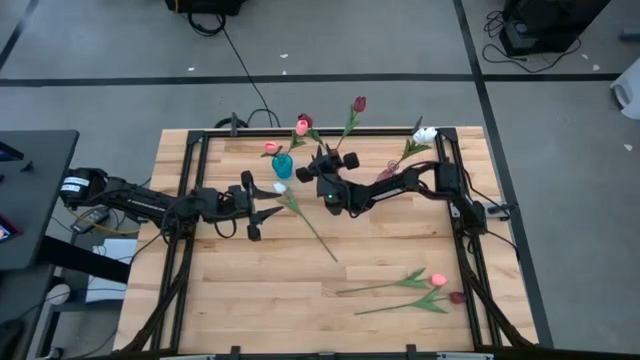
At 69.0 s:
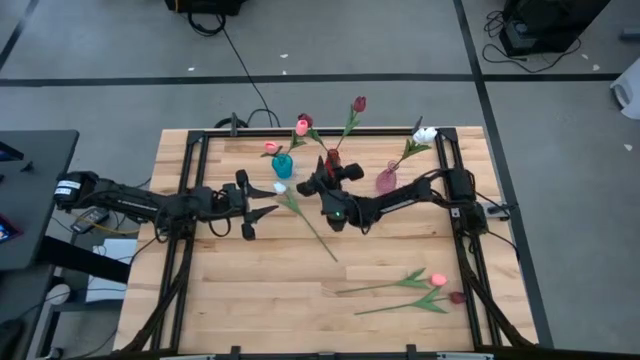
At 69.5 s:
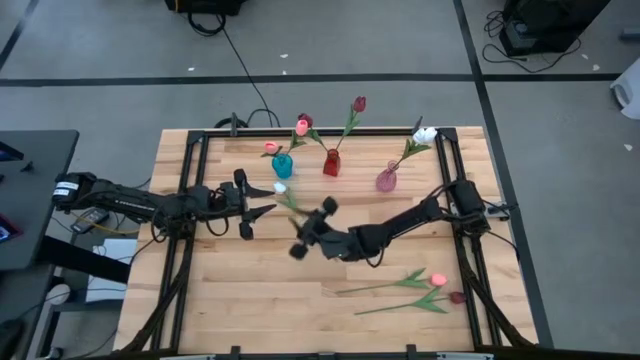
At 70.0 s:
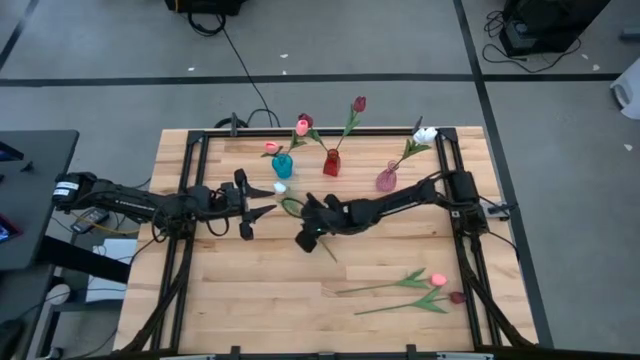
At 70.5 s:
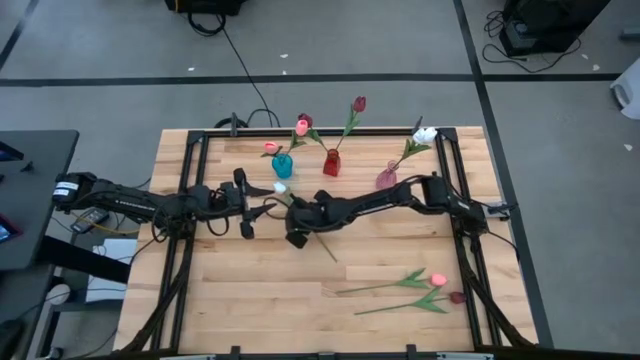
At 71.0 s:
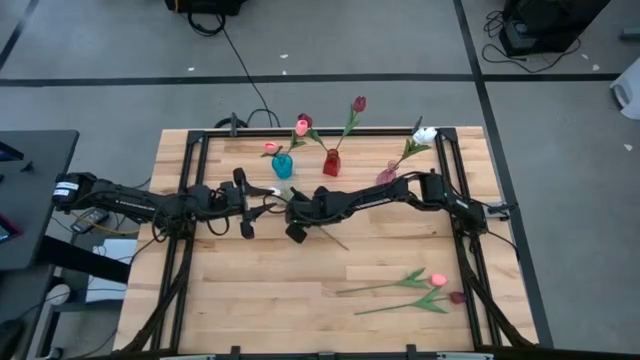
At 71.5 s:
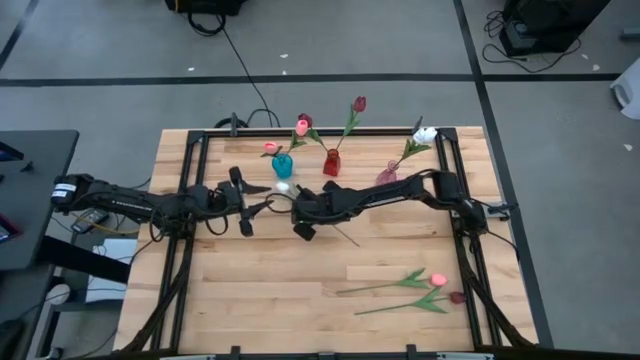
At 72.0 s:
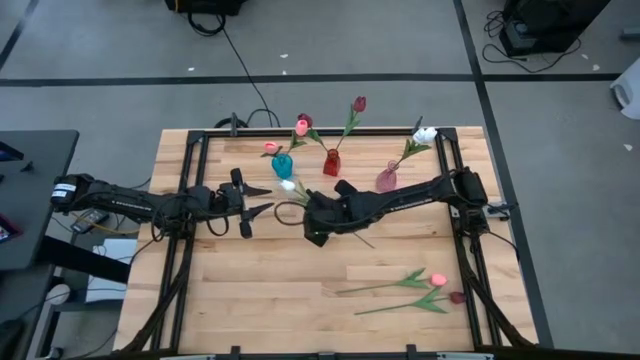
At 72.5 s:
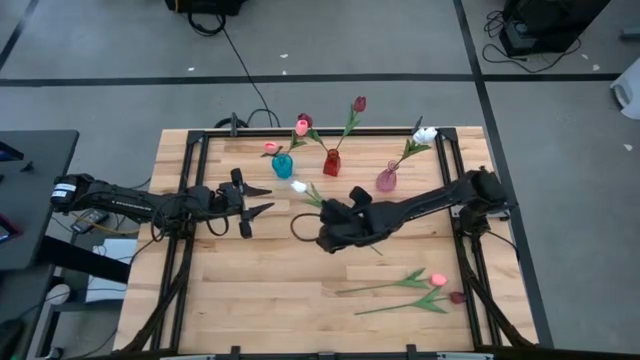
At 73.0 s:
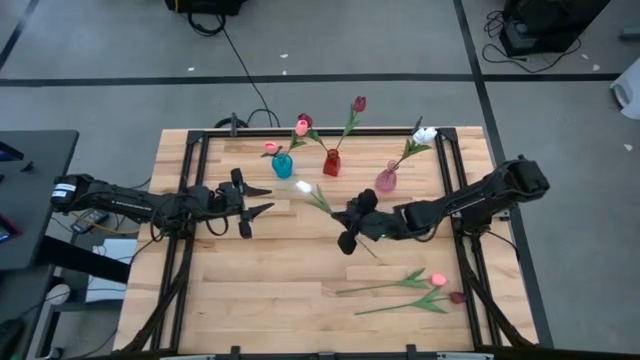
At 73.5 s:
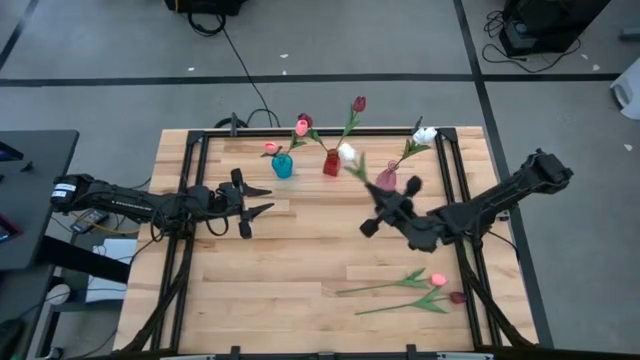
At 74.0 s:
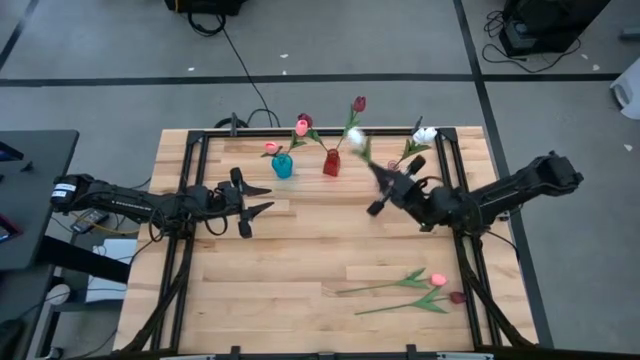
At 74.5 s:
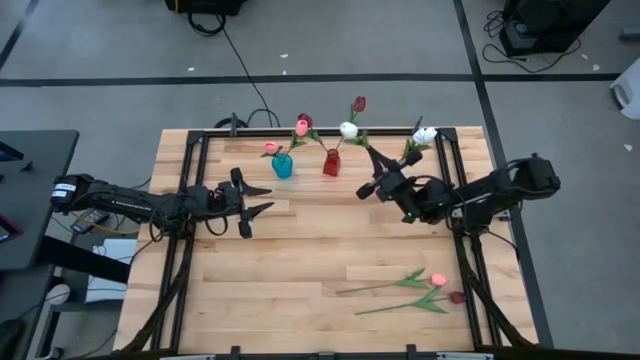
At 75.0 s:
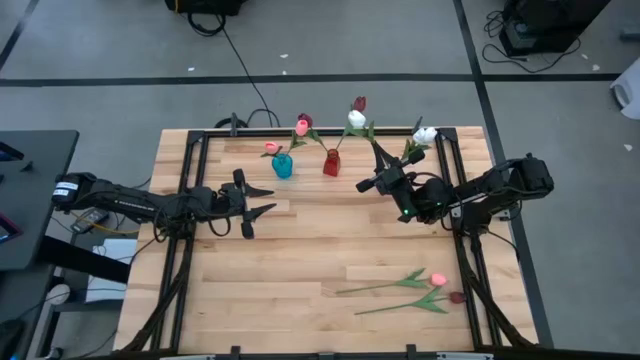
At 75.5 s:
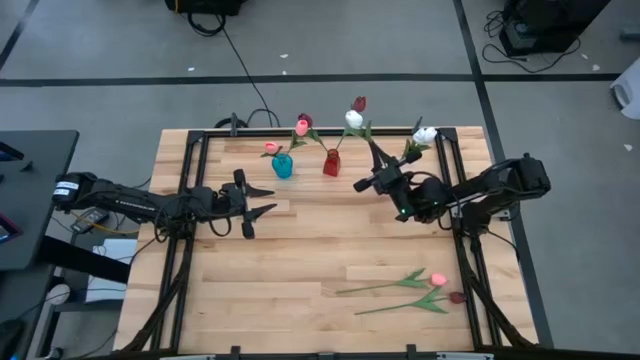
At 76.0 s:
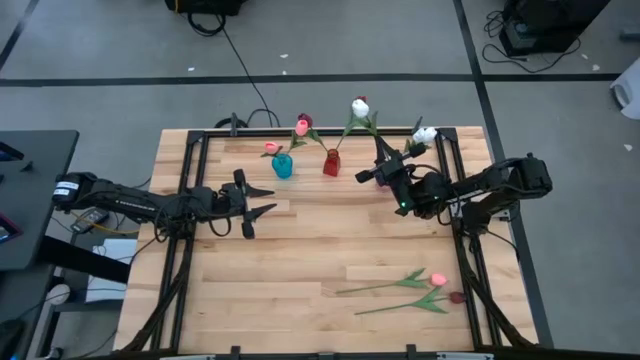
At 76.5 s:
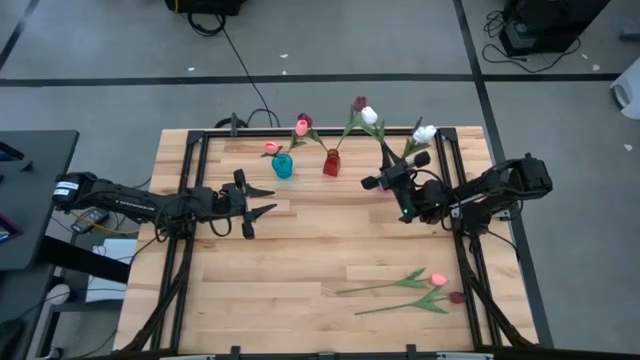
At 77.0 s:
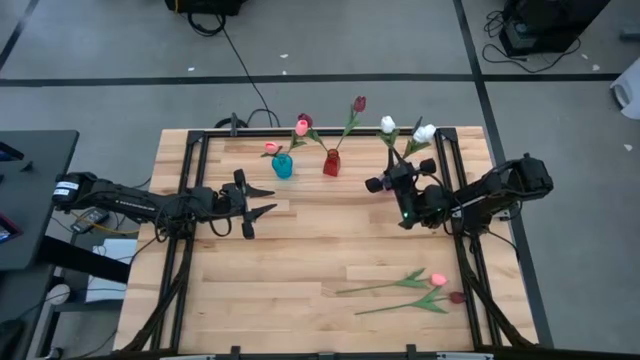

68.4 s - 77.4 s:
Task: Sort flowers into vase by color
Put the white tulip into the pink vase

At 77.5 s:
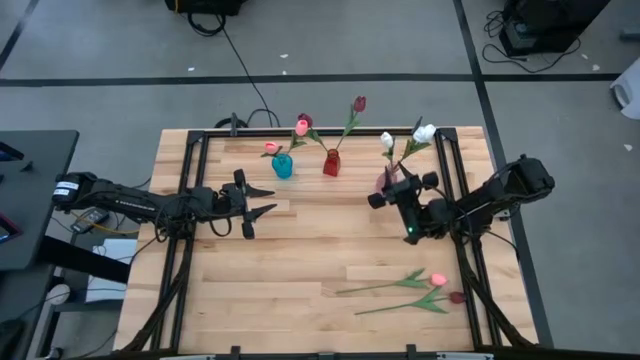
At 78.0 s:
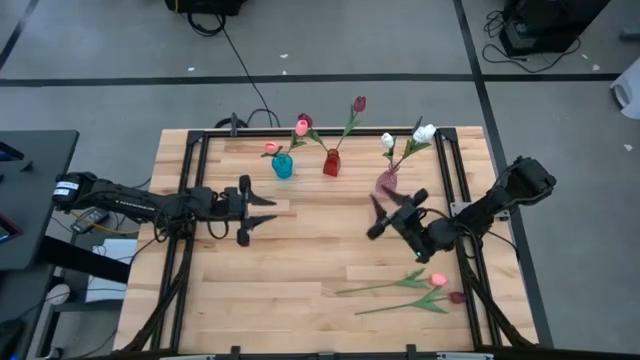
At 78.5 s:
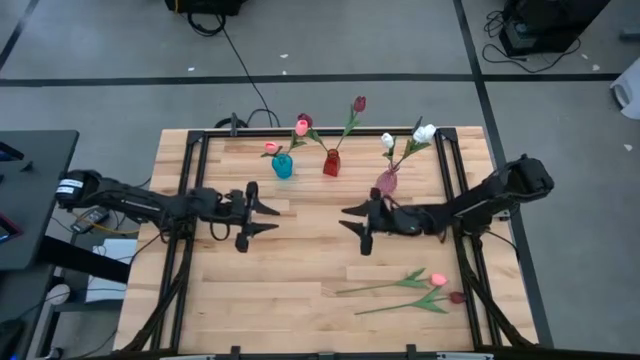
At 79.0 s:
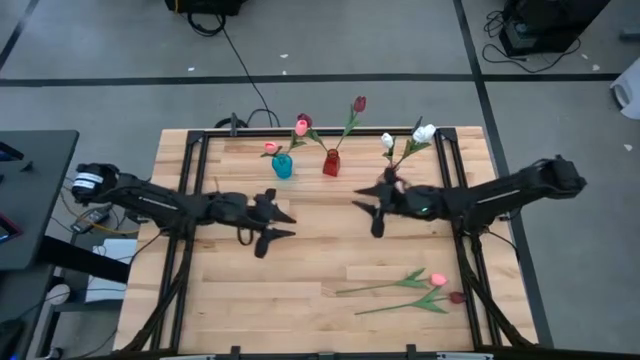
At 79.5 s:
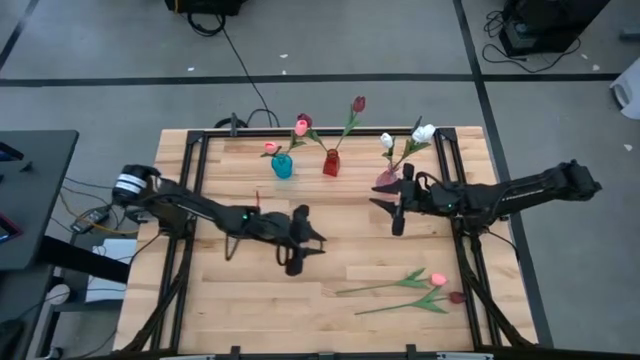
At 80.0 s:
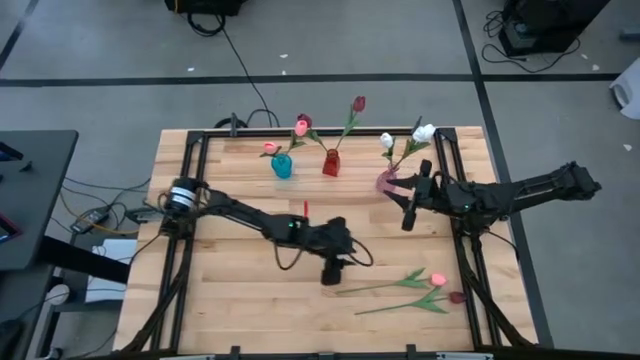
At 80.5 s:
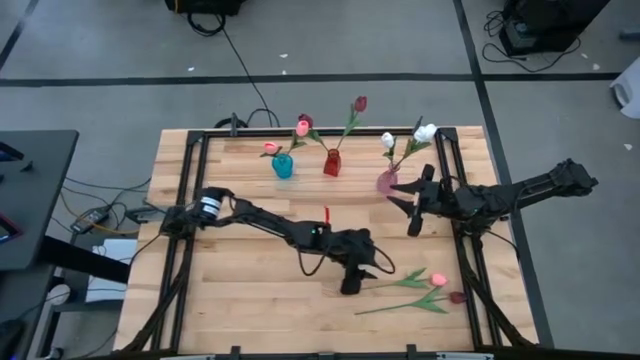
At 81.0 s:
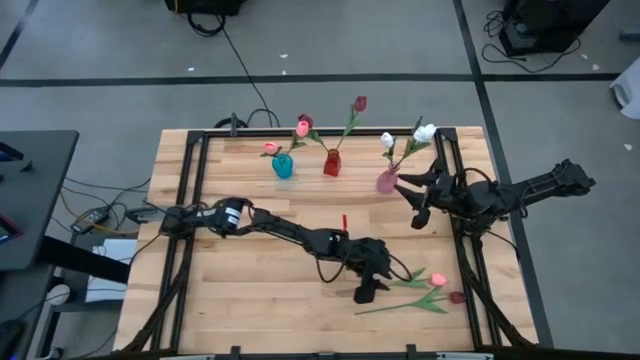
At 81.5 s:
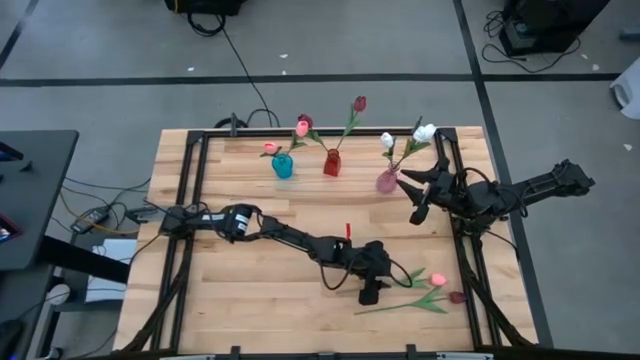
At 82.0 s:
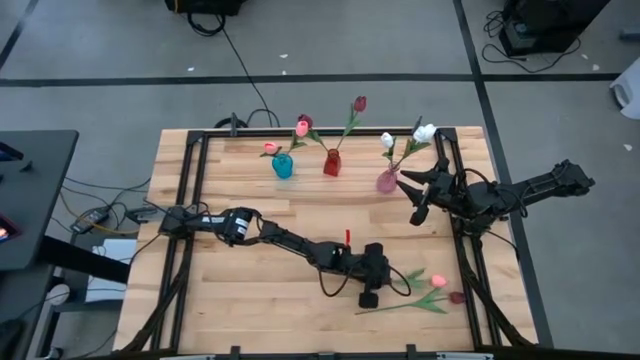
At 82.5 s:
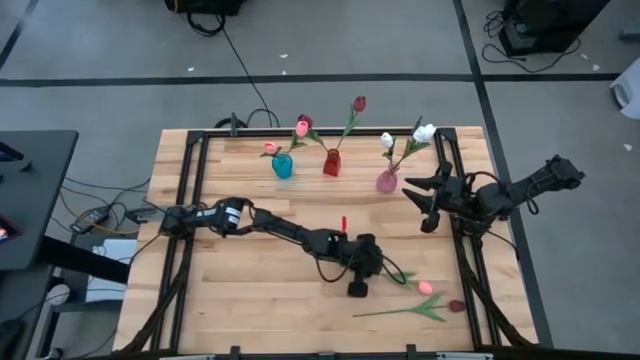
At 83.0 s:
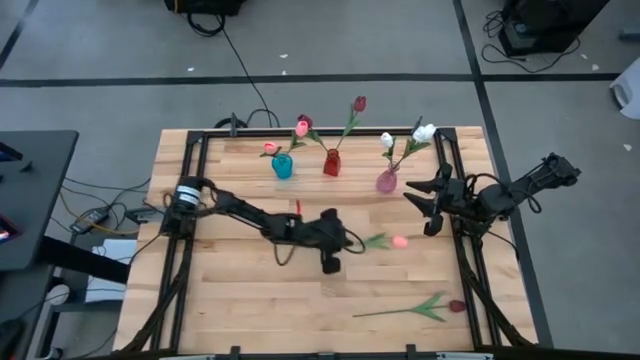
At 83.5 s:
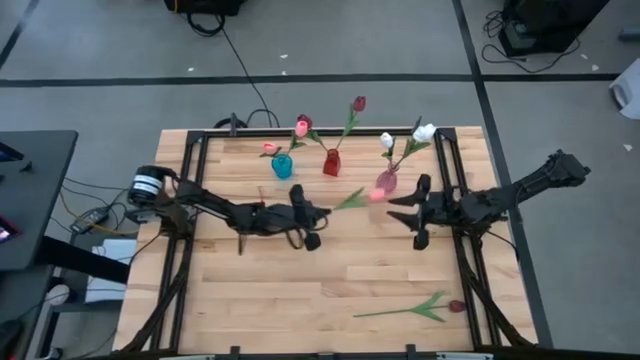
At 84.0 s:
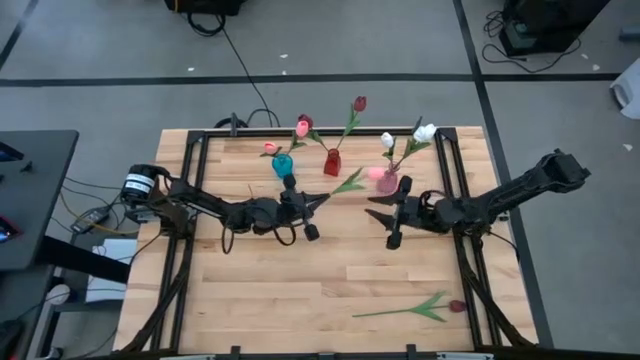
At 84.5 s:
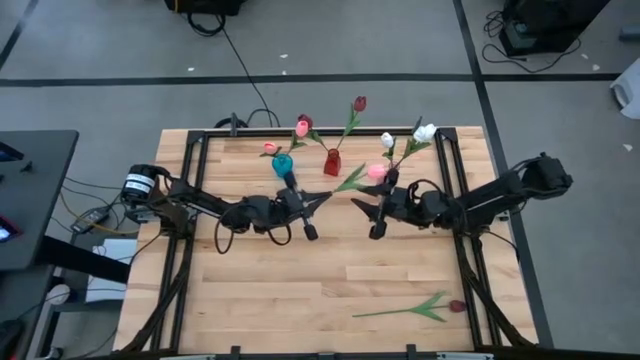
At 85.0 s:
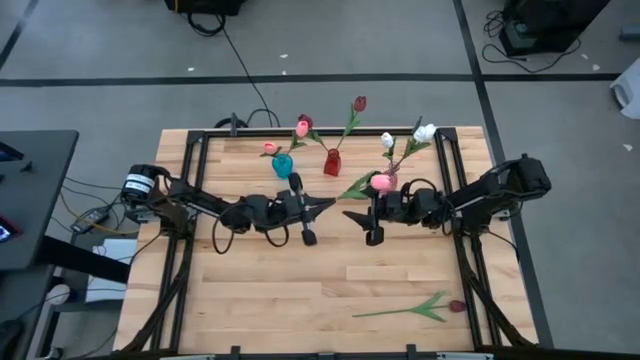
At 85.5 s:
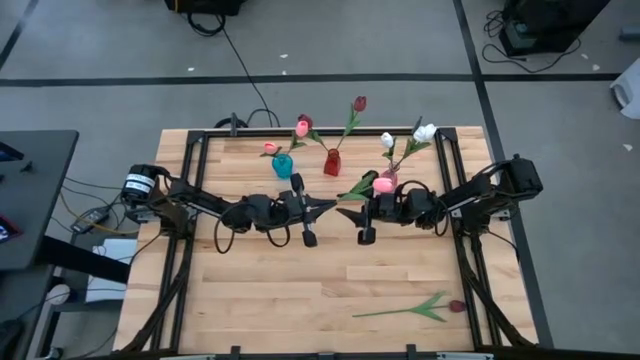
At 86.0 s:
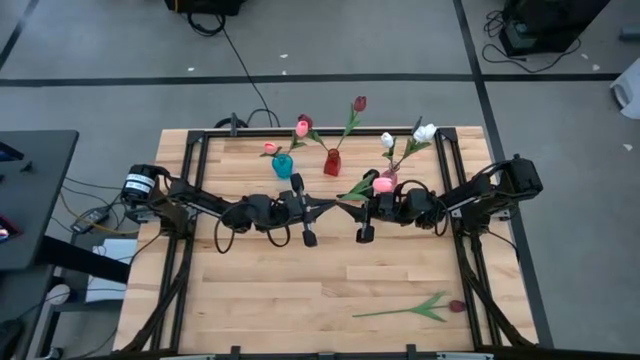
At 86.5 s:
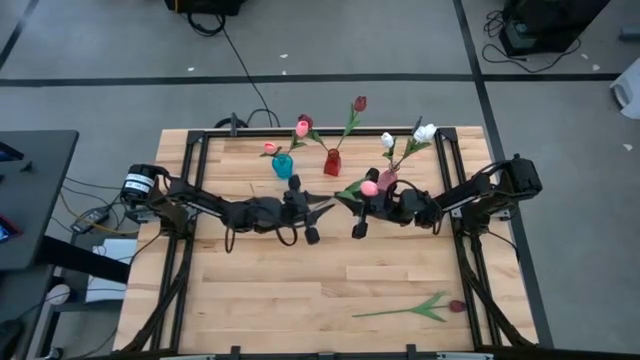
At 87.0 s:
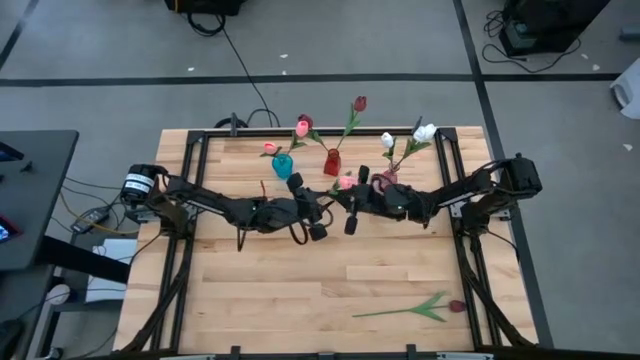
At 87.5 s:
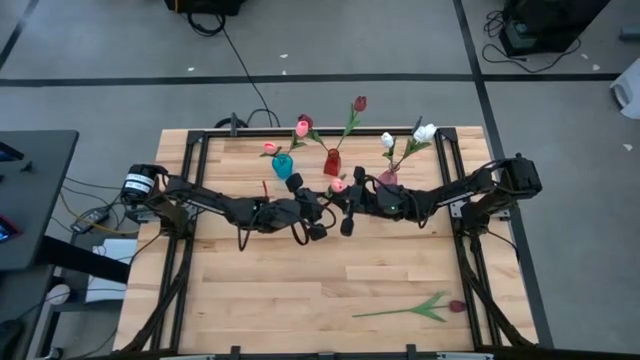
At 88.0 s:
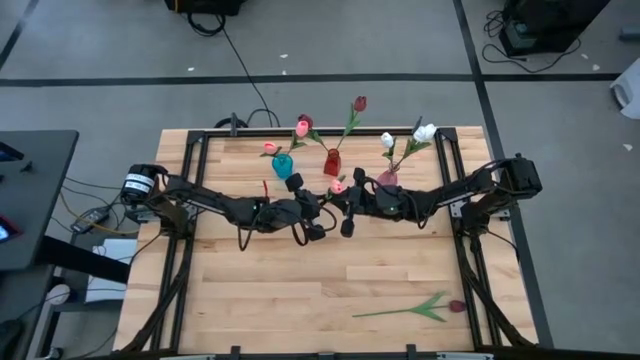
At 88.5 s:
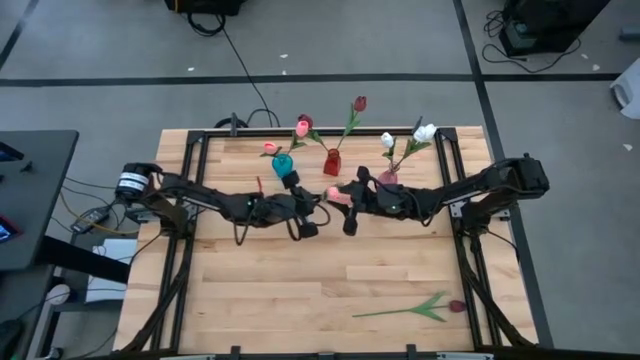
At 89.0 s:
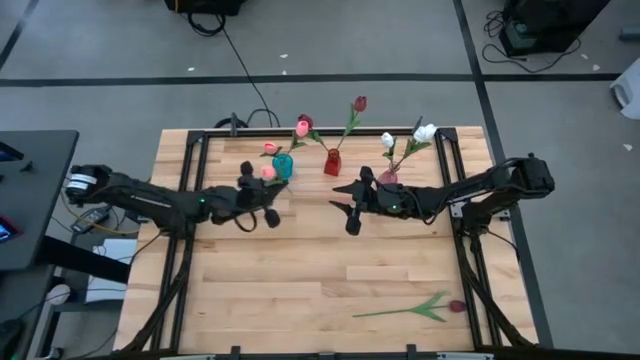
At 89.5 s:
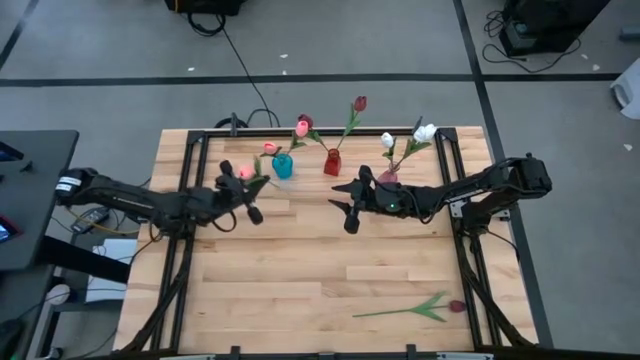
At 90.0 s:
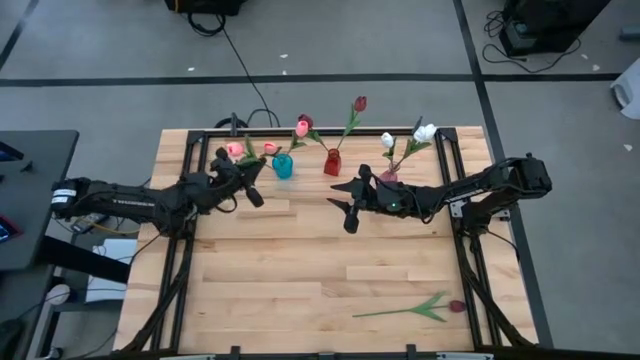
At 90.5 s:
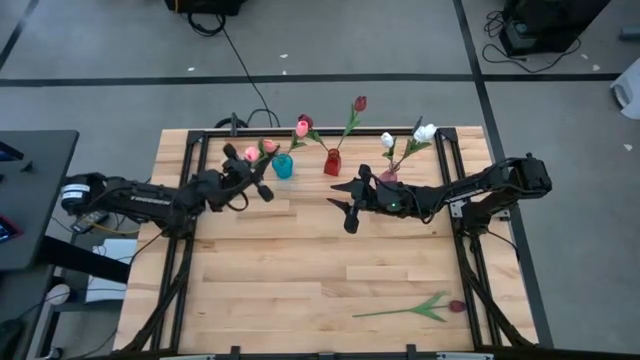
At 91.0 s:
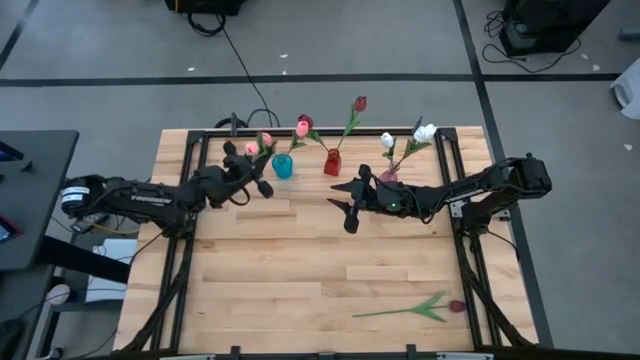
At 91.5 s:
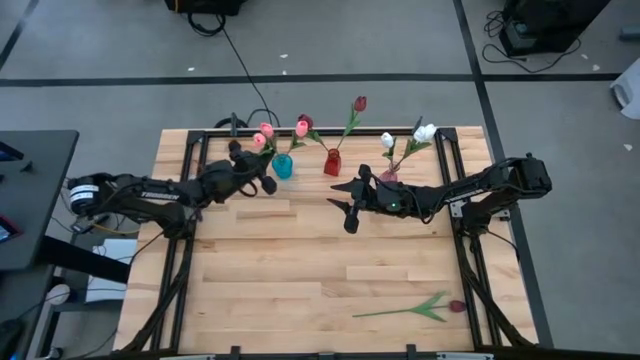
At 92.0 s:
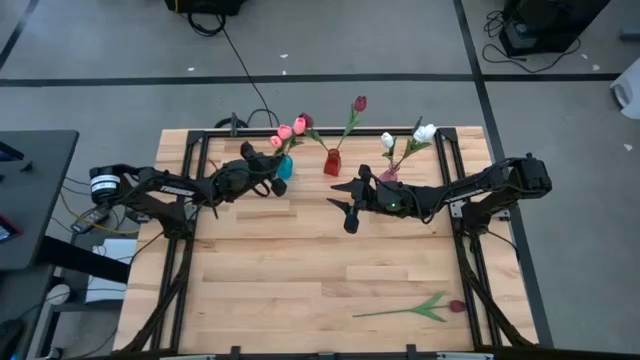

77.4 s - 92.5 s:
Put the pink tulip into the blue vase
